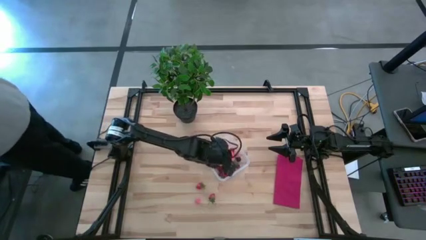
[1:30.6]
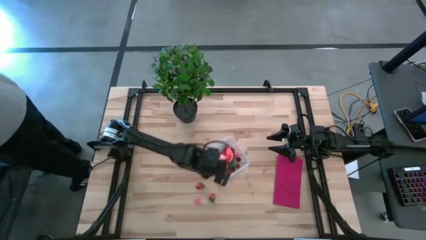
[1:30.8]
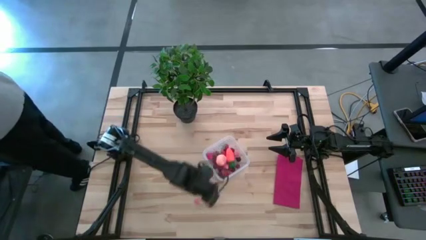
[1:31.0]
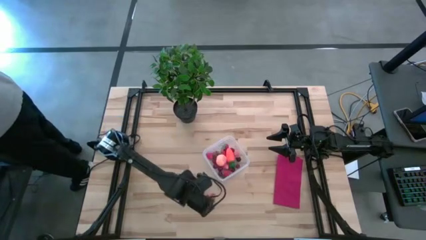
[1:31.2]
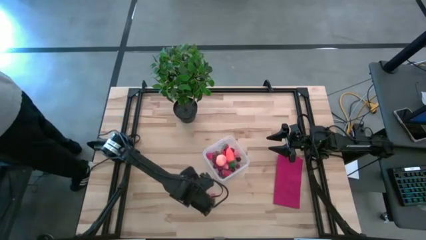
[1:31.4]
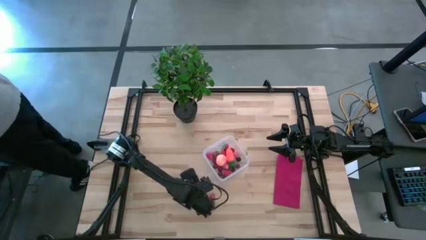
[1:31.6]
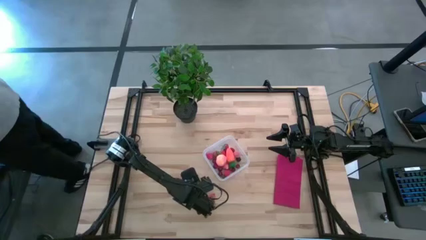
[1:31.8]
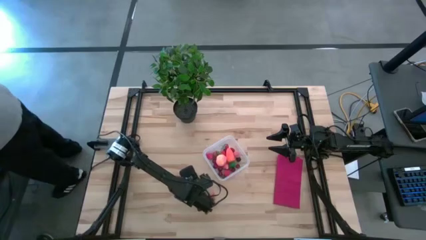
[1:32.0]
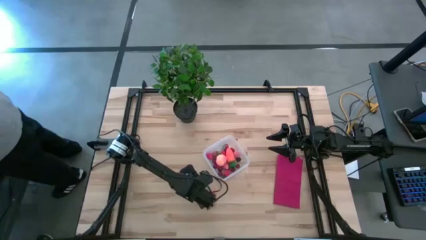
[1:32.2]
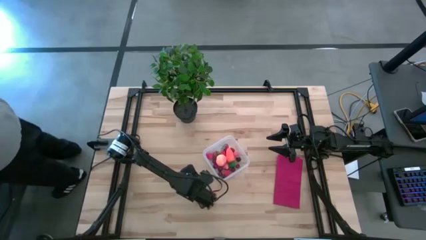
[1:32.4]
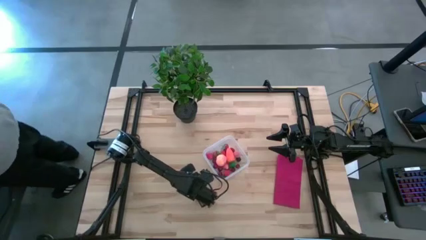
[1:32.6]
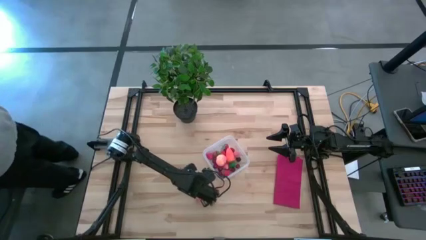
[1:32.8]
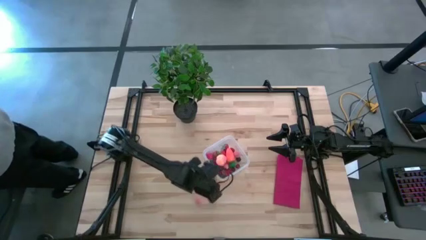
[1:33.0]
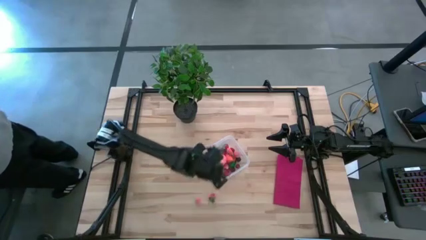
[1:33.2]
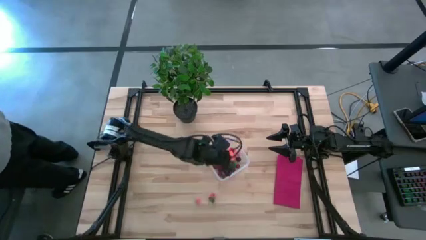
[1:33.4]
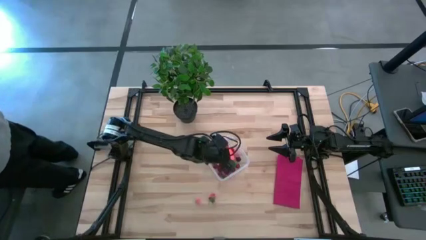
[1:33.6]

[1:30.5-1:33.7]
Task: Pick and placing Produce into tupperware
Put the red strawberry into the transparent bin

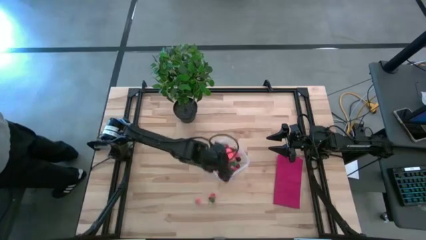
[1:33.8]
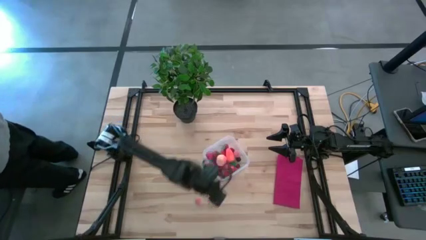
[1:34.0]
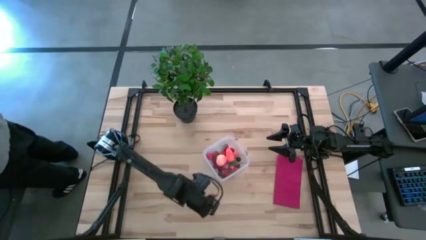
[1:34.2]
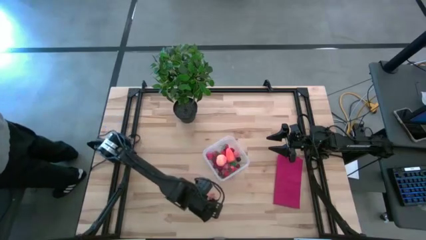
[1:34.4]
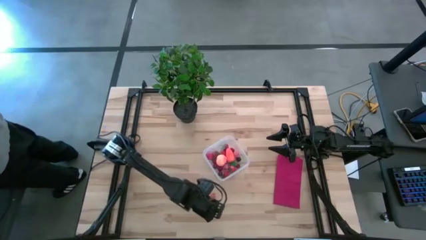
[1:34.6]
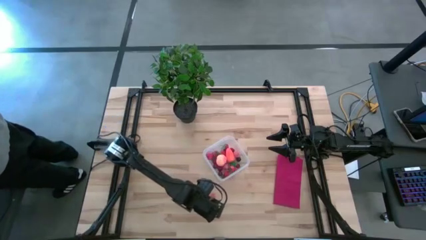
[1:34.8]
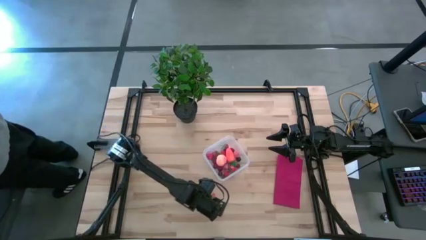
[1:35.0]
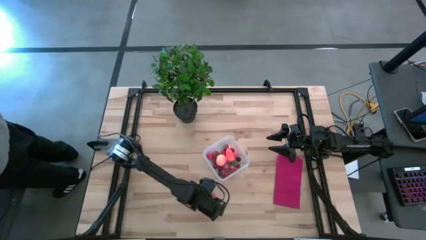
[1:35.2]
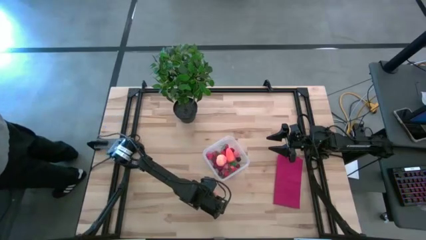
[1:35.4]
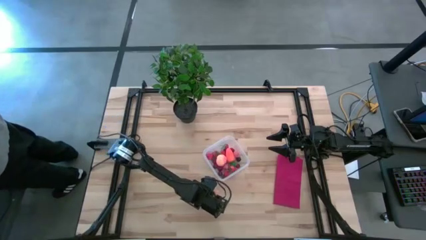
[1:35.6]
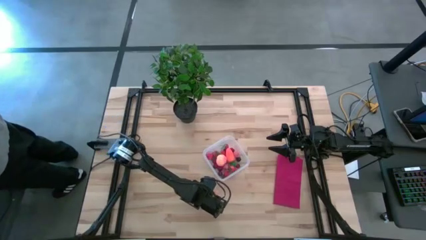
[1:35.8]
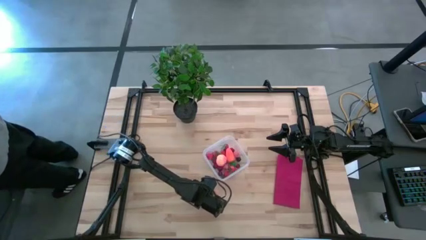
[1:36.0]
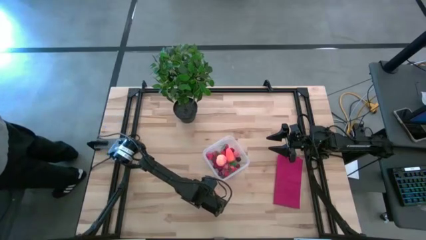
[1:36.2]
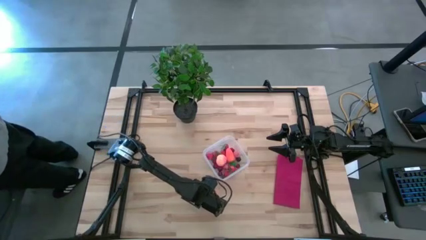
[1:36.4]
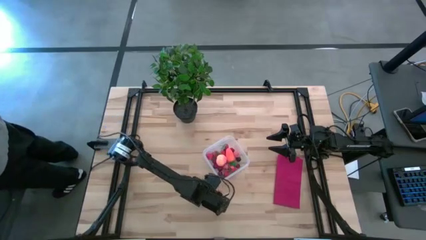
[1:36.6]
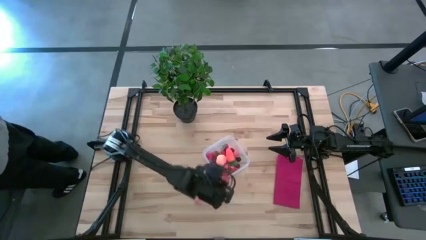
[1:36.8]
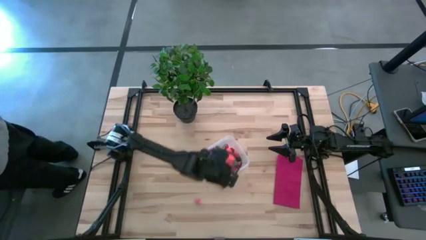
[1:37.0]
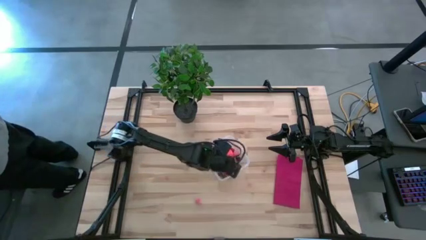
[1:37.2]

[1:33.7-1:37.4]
Put the red strawberry into the transparent bin

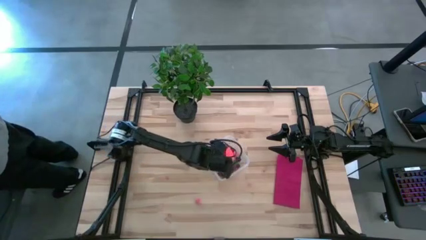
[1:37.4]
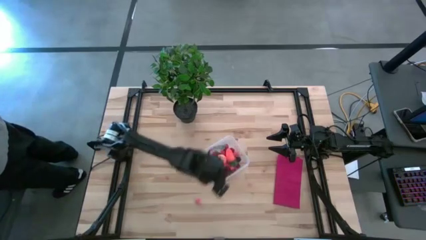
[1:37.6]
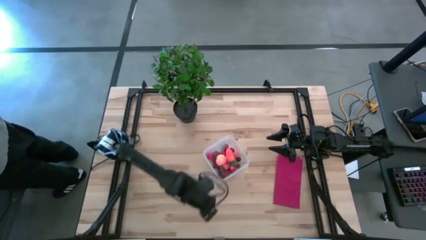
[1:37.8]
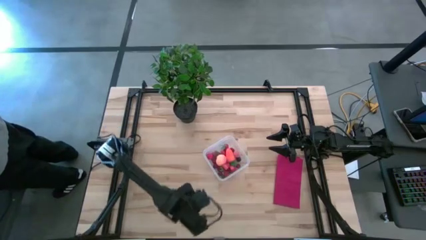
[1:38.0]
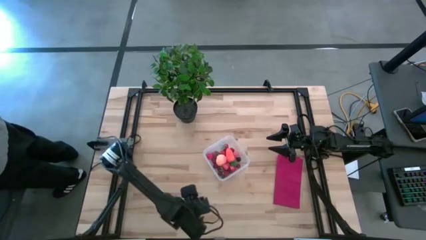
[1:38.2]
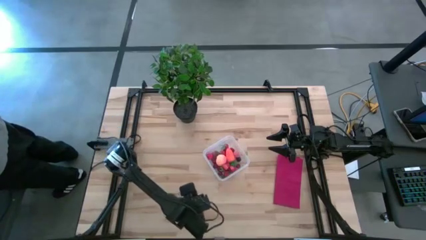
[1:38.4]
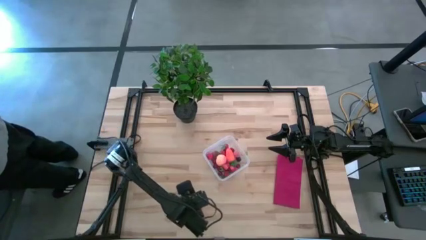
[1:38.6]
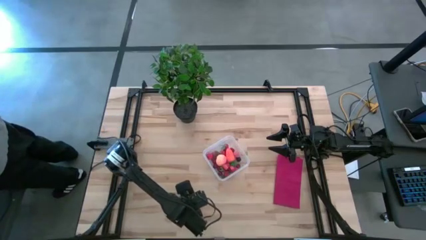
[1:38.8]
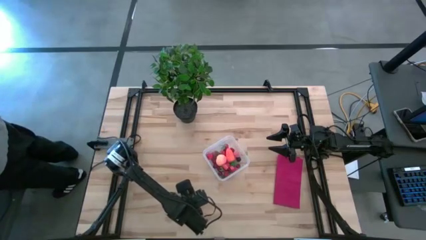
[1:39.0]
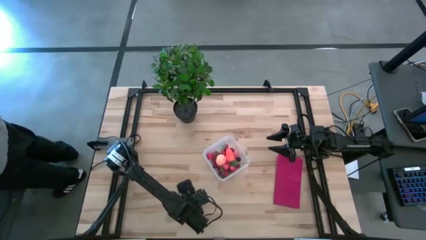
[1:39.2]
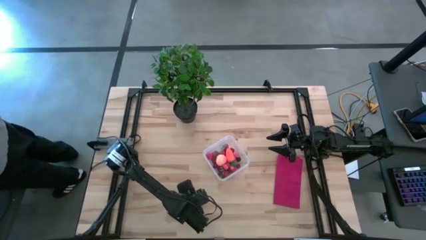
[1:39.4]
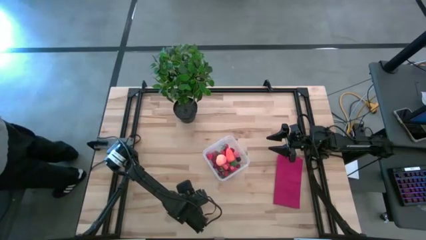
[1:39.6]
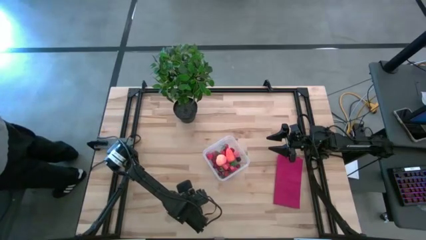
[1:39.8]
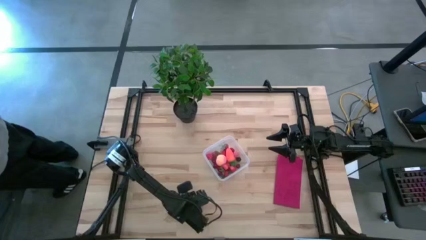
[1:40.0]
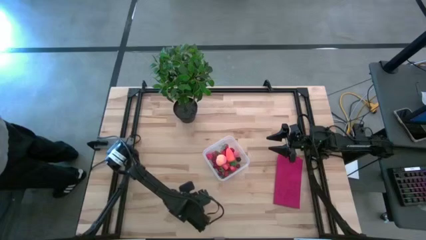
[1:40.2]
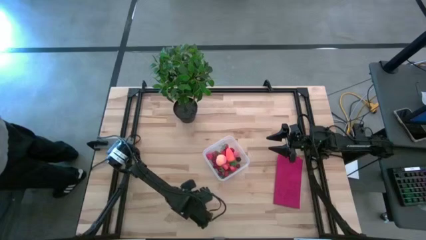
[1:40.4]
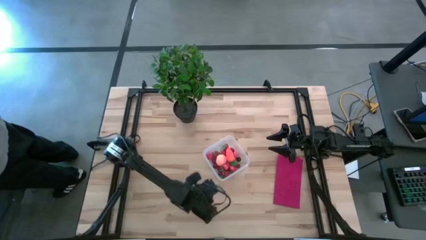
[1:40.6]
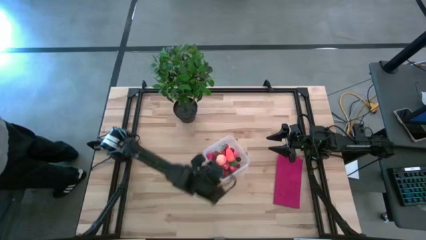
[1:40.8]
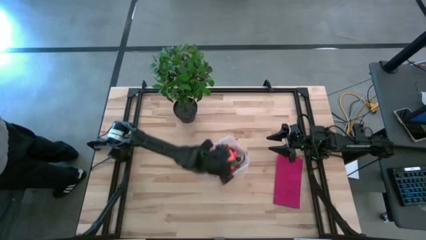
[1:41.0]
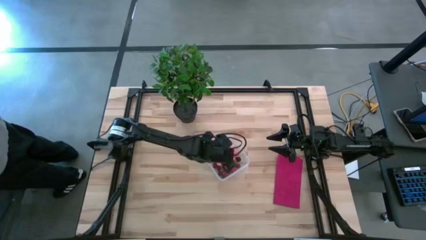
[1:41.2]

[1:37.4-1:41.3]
Put the pink peach into the transparent bin

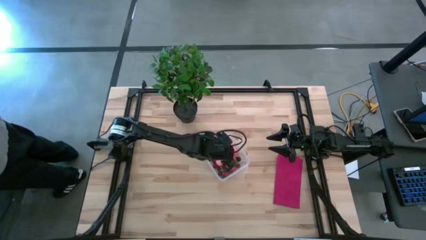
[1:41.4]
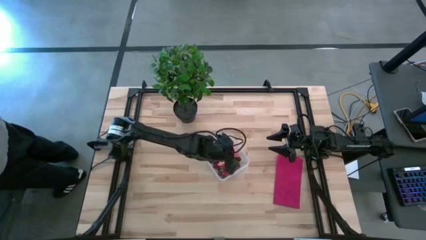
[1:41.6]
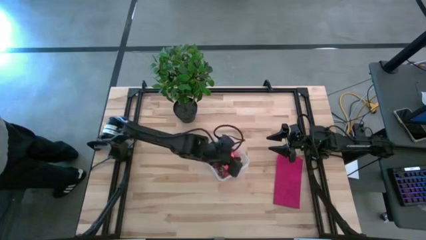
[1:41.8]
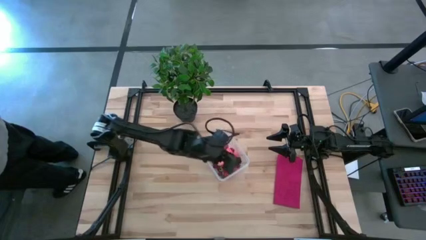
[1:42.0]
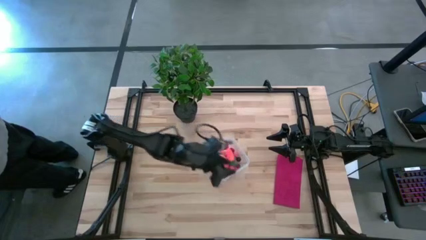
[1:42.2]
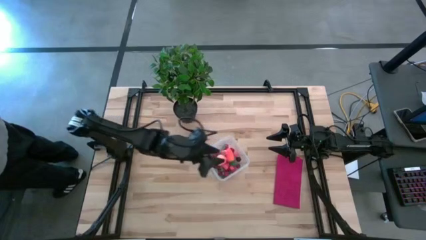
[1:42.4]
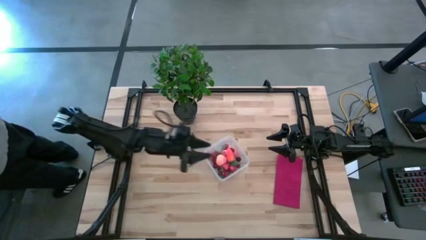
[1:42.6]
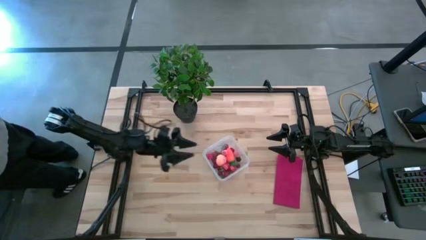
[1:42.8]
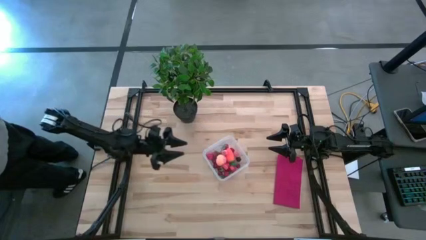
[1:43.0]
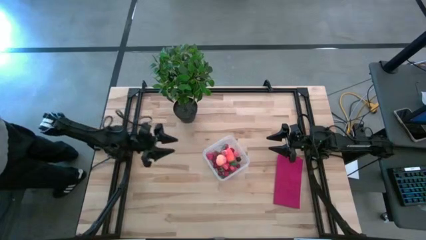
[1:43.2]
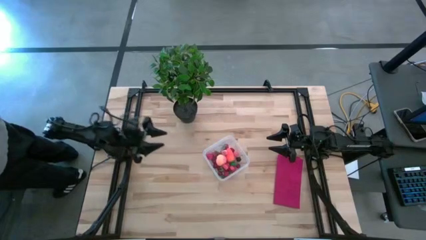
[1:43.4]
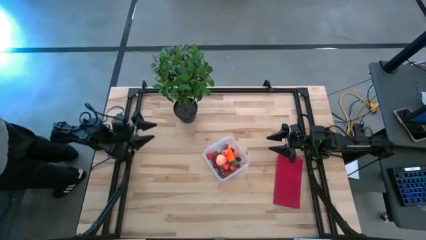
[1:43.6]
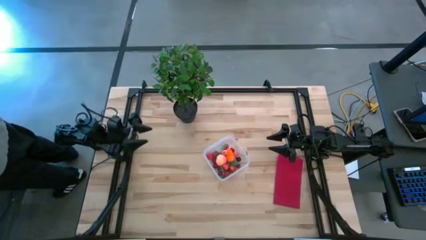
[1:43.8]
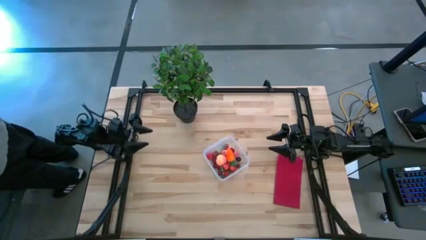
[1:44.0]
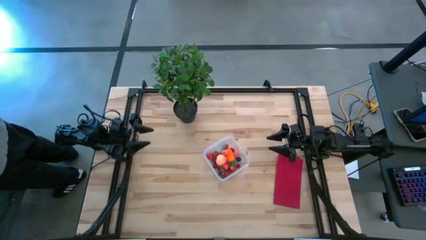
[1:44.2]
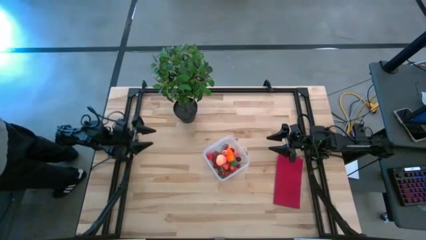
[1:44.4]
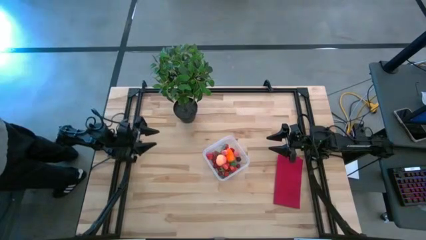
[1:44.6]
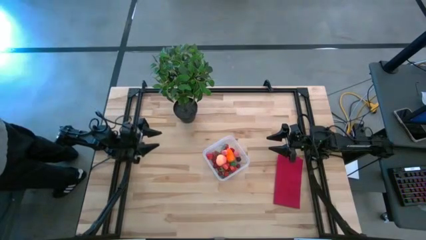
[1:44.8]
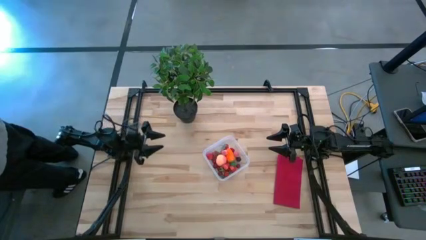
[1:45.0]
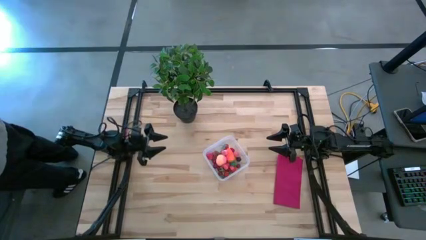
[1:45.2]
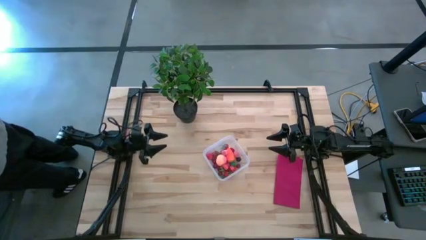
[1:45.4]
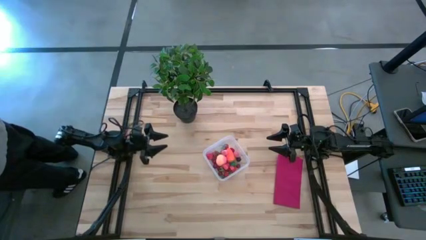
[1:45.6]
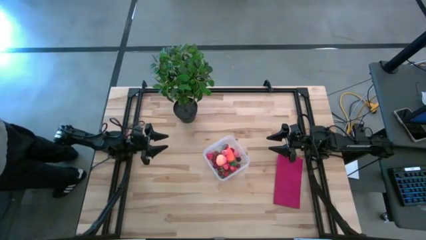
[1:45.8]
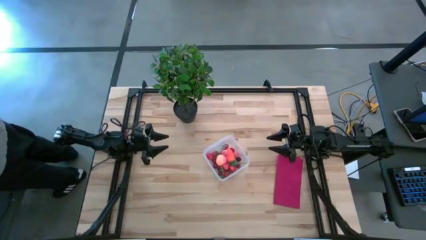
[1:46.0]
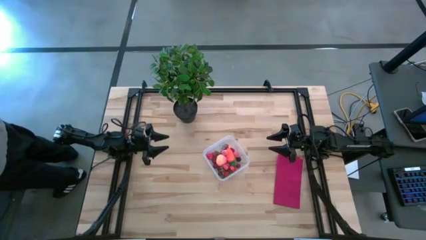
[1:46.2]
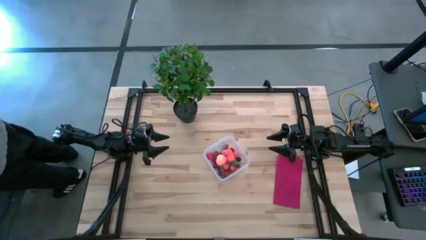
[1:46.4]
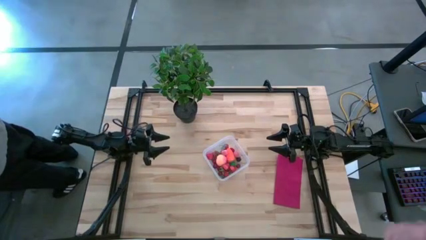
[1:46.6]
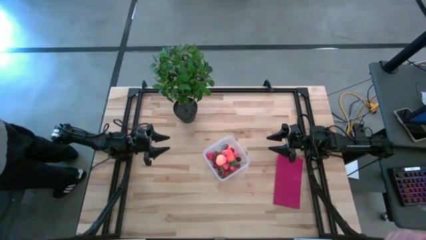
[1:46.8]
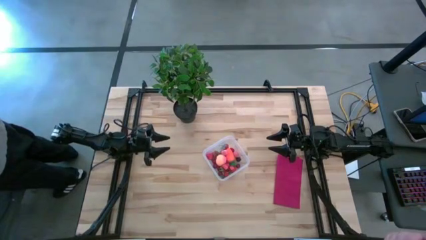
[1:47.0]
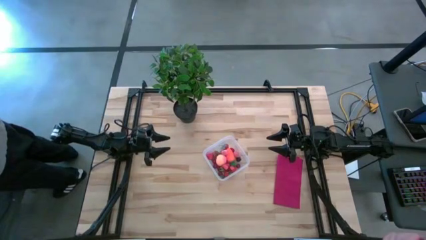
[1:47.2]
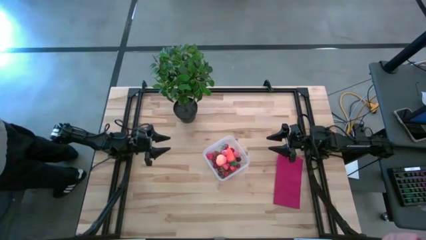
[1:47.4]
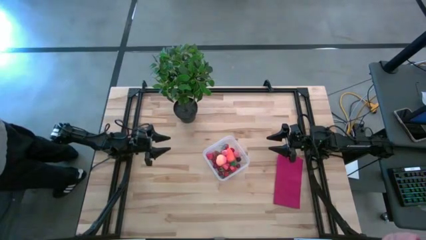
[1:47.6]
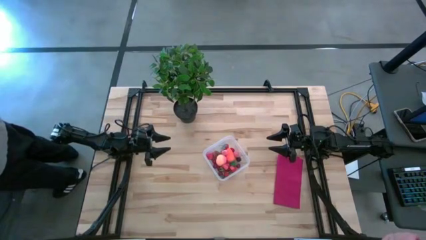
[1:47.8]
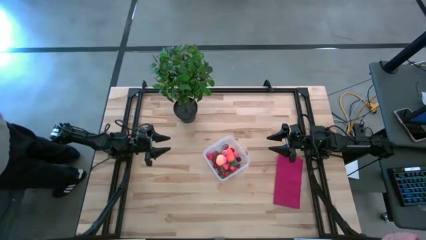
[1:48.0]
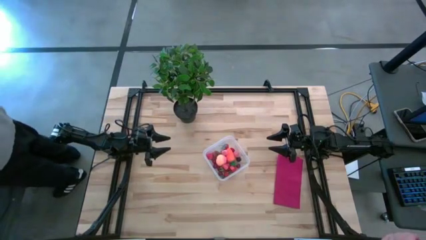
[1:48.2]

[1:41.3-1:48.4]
Return to Home Position
